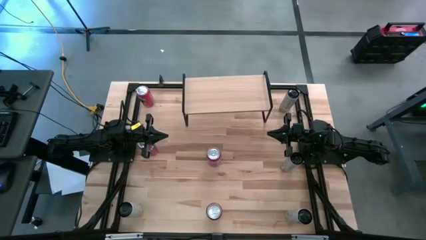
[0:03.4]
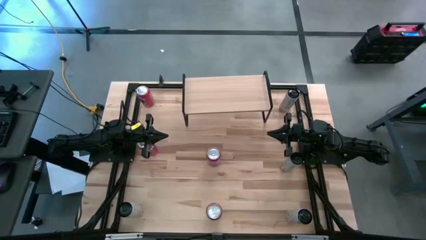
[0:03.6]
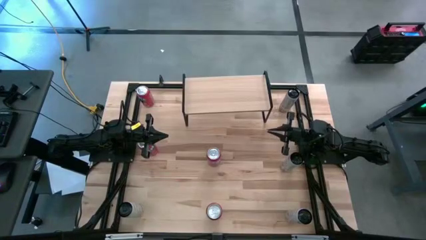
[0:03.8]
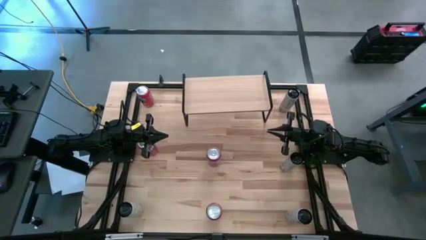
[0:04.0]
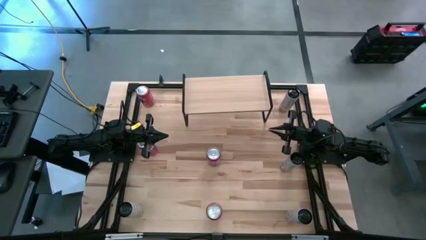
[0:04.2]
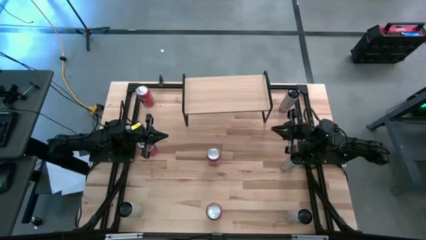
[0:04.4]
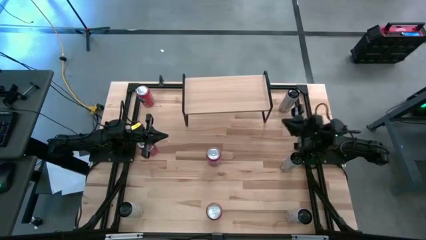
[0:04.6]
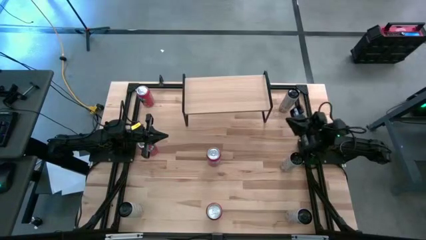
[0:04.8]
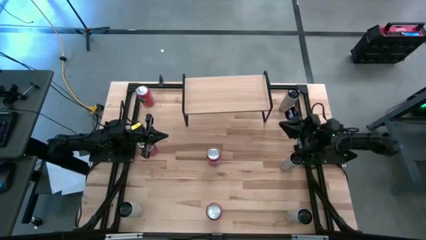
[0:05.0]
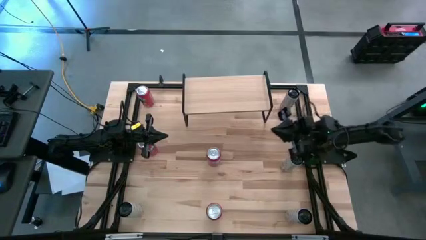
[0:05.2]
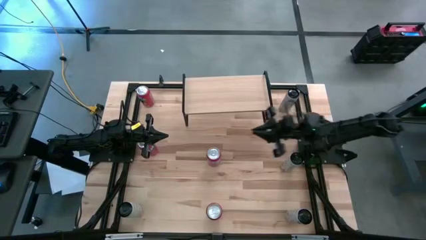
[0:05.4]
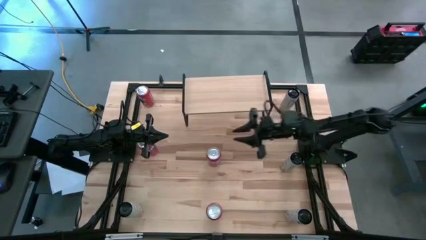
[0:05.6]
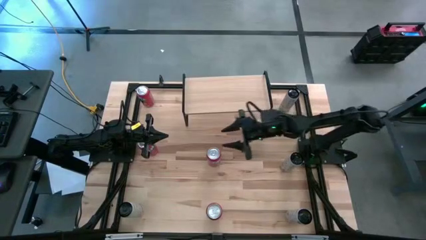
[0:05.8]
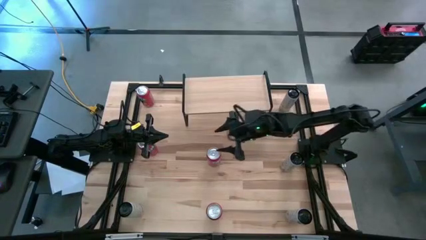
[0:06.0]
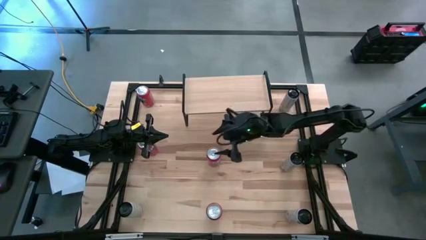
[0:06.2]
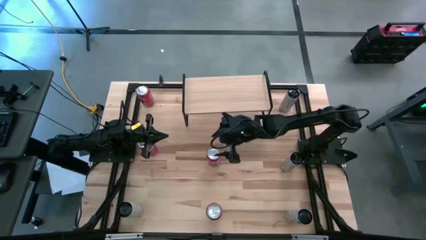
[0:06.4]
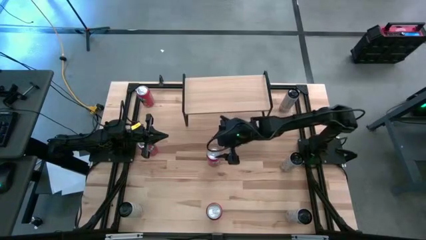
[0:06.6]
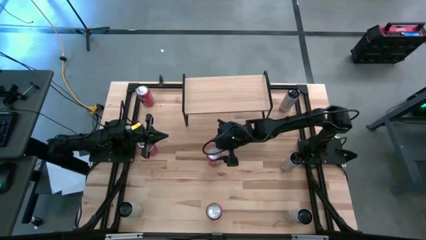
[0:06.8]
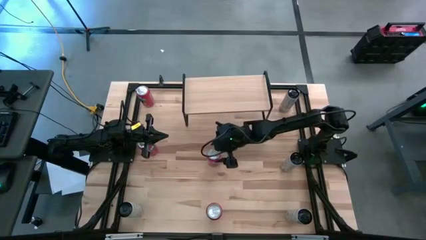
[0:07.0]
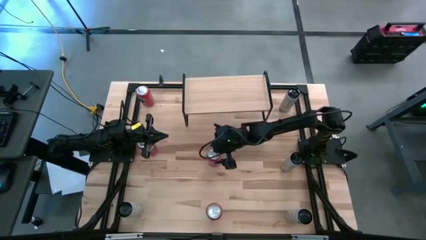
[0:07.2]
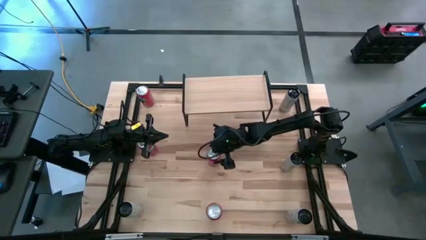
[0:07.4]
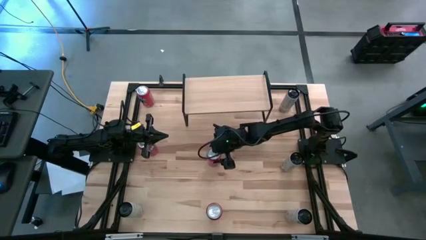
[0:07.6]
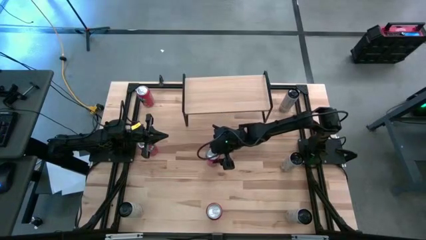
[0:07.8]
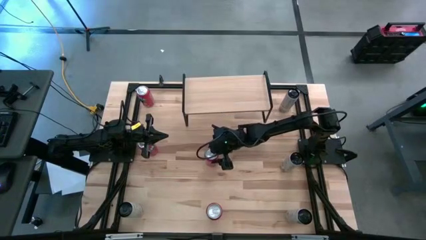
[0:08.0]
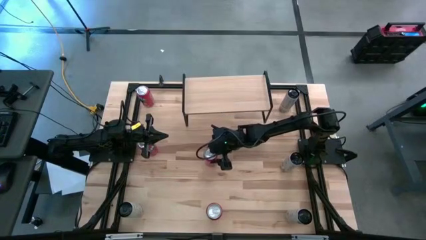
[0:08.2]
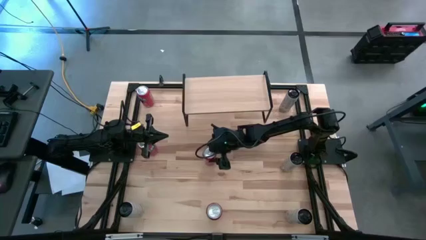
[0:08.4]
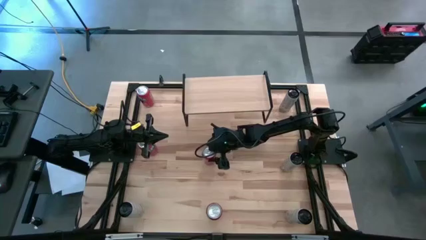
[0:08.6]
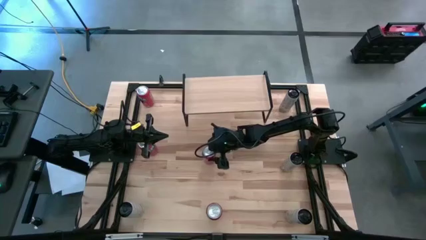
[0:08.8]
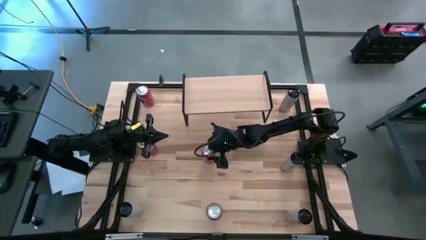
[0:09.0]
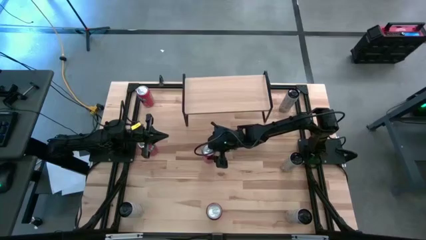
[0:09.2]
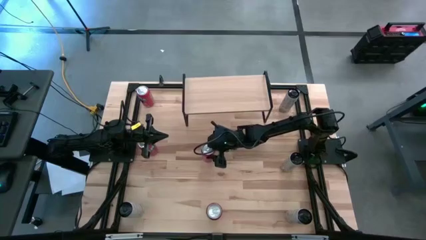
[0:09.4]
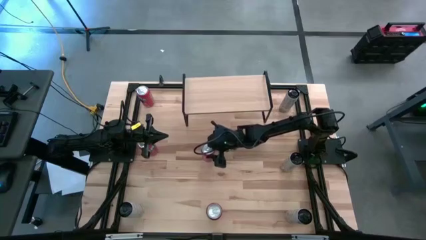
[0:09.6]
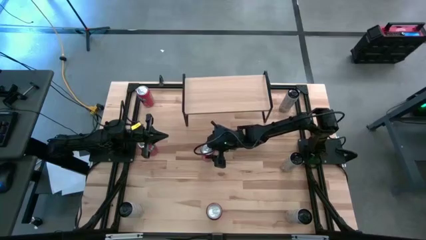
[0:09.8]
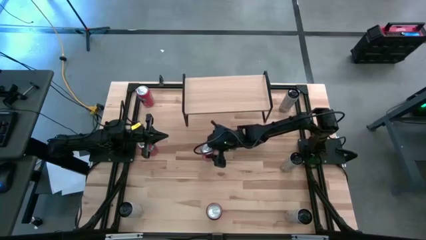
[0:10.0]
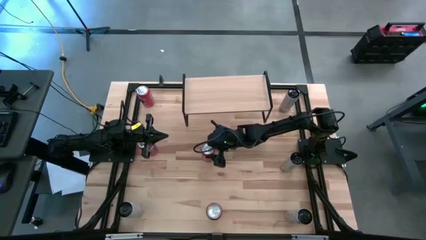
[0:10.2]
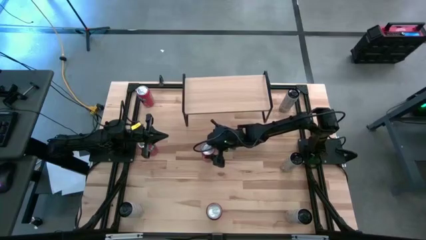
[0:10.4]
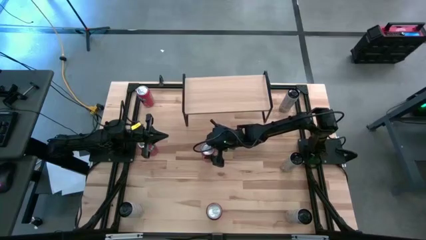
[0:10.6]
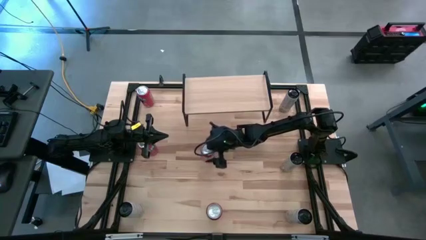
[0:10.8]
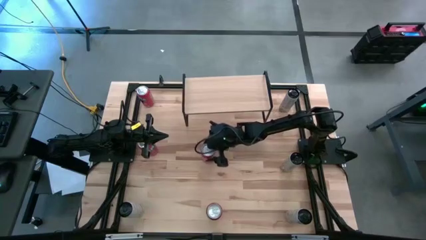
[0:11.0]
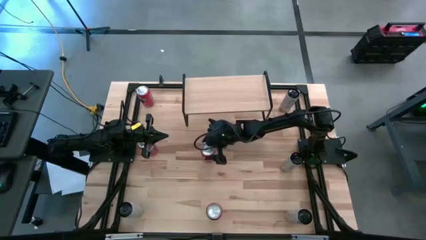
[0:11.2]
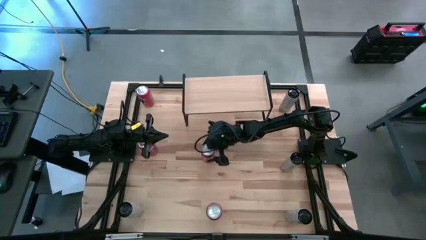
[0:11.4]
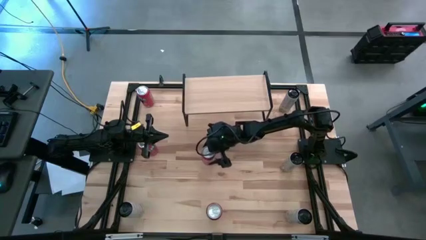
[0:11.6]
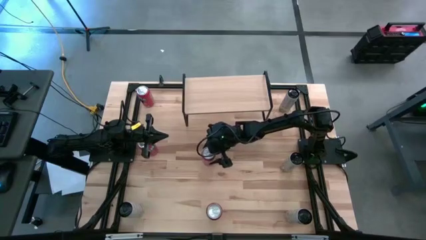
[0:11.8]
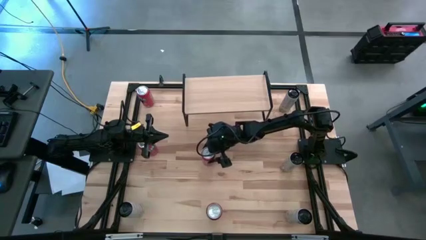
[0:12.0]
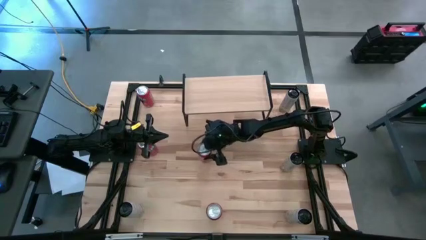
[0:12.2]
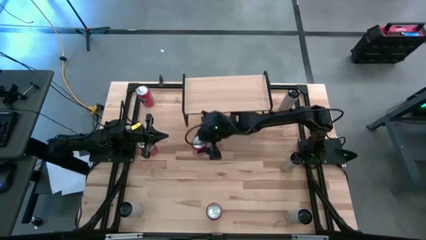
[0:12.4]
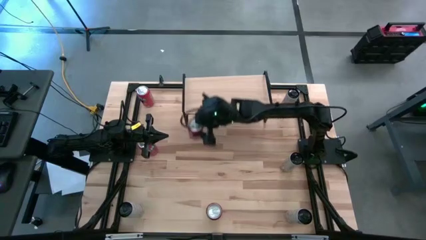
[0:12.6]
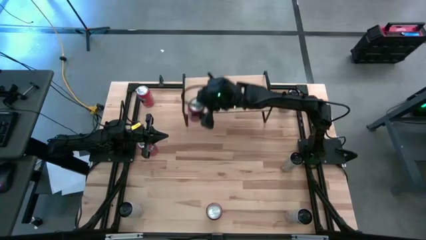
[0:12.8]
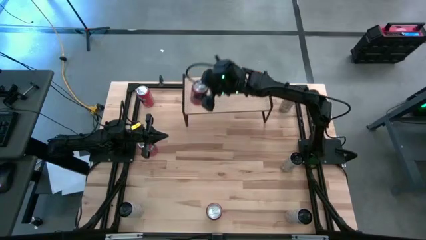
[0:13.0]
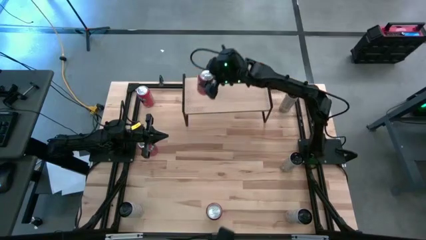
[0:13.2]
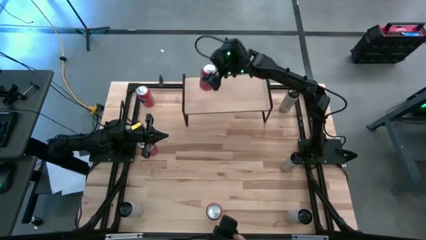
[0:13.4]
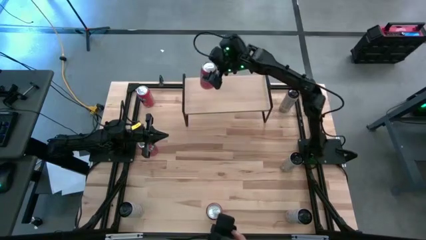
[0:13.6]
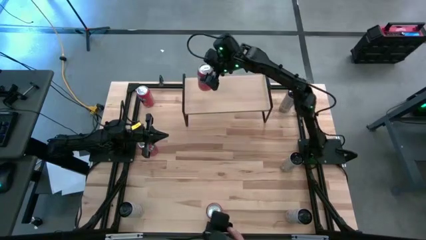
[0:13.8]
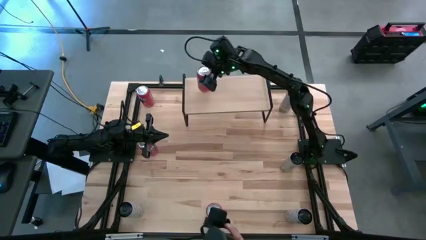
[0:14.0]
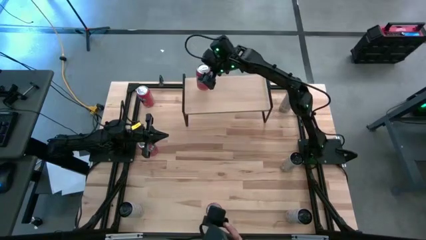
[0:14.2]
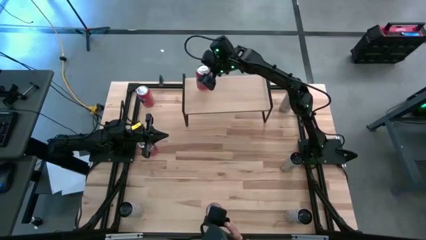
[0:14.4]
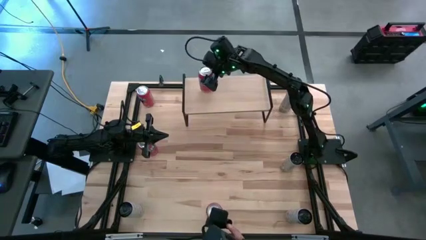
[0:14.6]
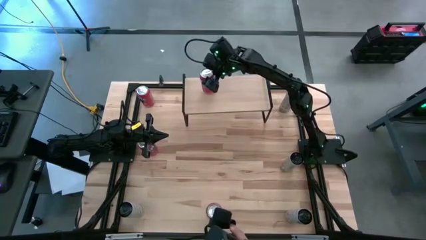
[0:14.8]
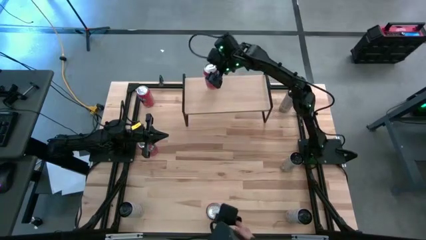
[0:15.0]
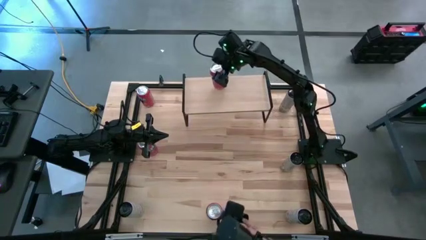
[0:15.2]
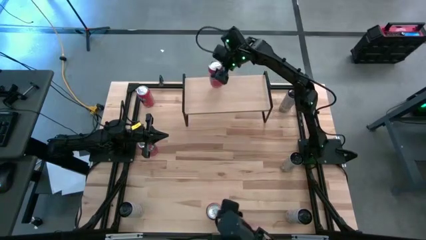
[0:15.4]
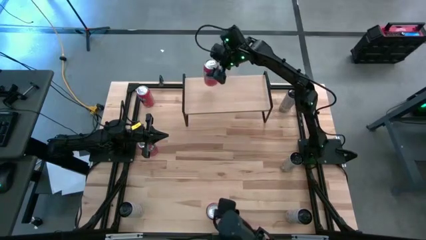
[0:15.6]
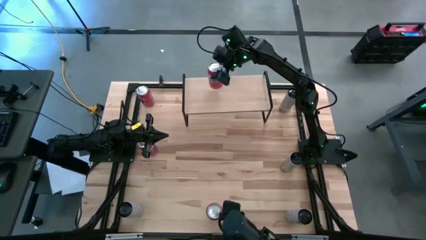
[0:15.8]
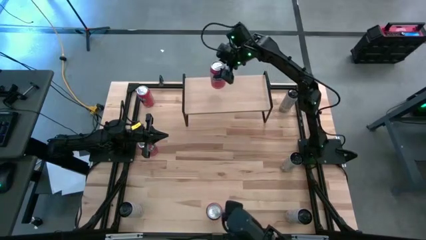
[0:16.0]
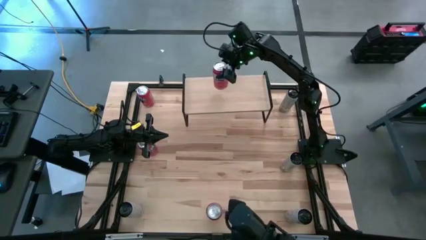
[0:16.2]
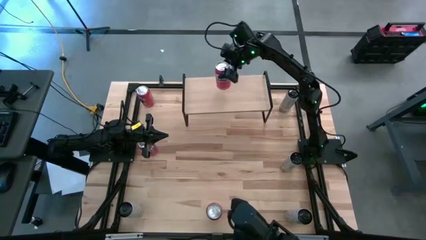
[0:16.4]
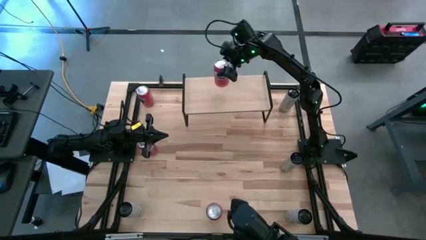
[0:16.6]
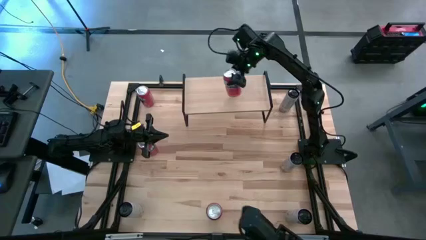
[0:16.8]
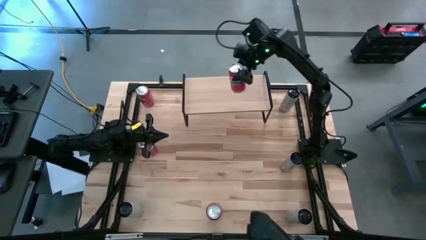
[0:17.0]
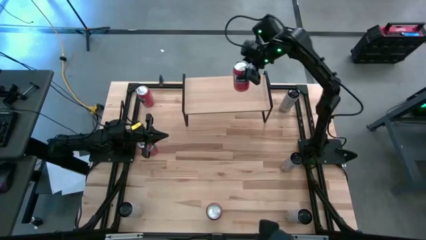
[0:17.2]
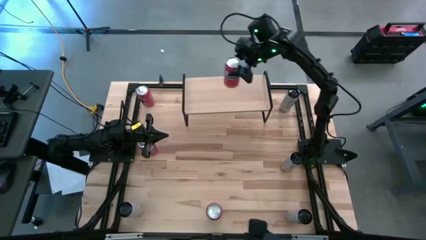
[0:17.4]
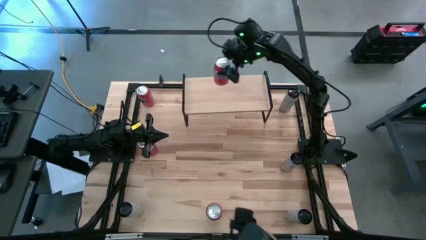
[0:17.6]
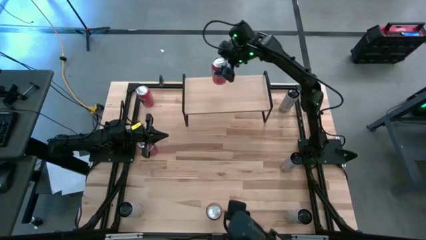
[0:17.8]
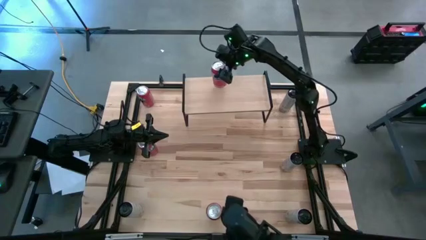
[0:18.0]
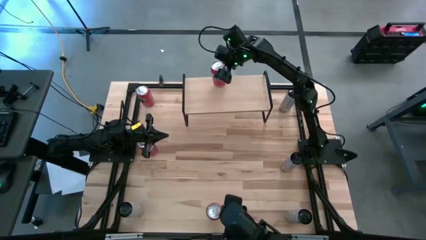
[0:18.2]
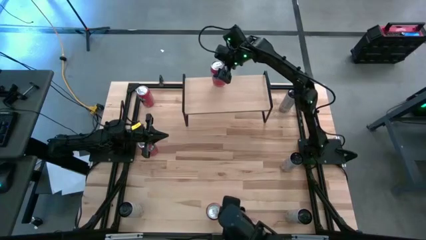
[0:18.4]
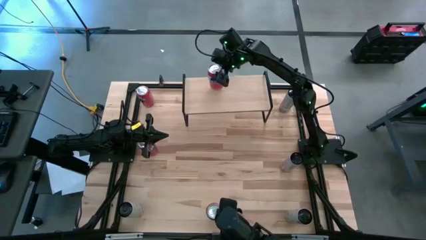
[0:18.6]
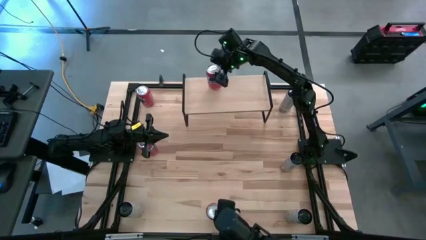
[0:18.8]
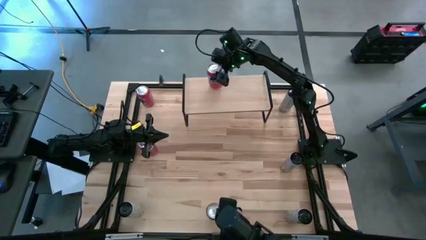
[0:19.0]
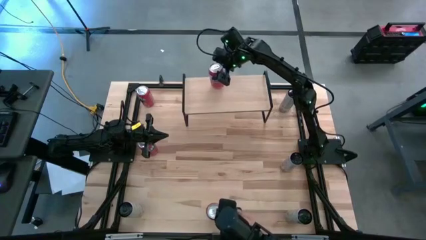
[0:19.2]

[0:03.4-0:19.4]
Task: Place canned beverage on shelf
Put the red soda can on the shelf
